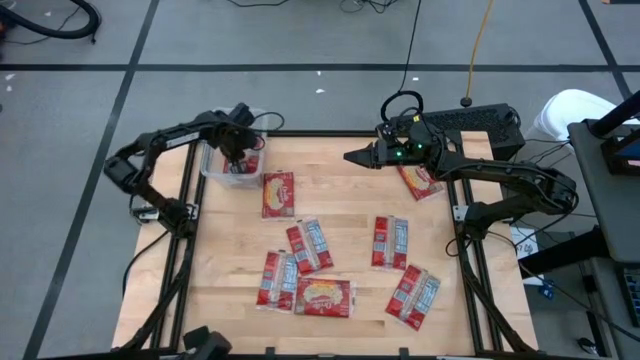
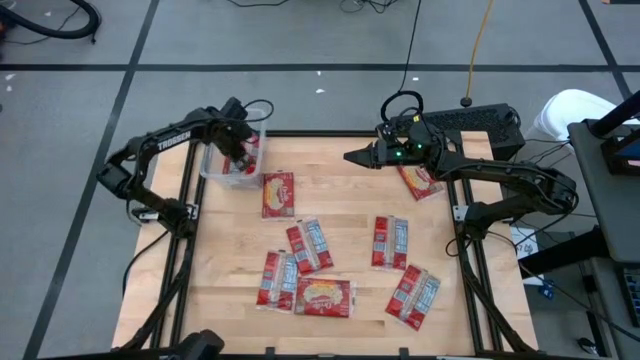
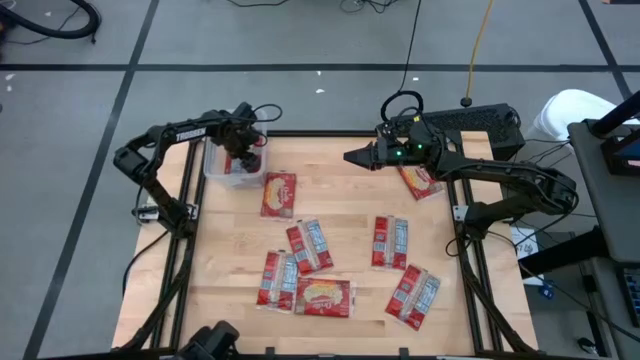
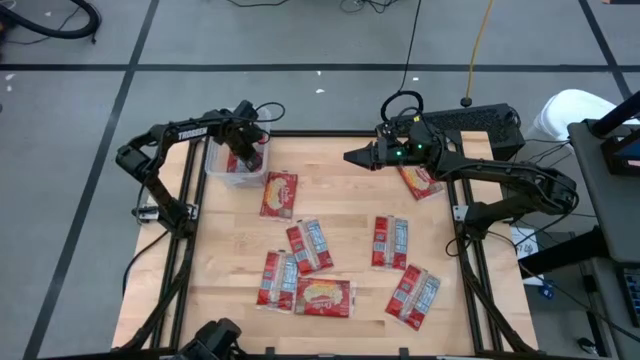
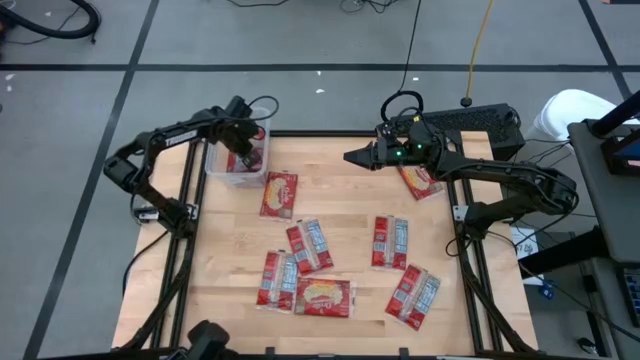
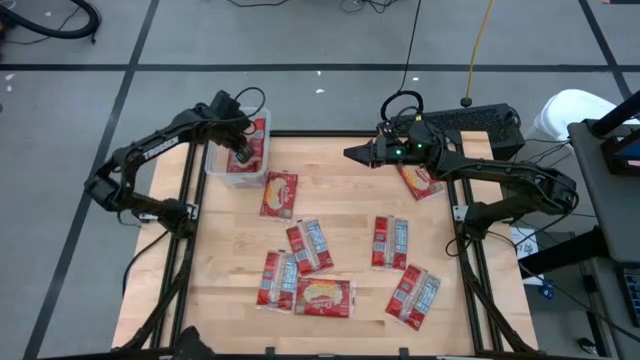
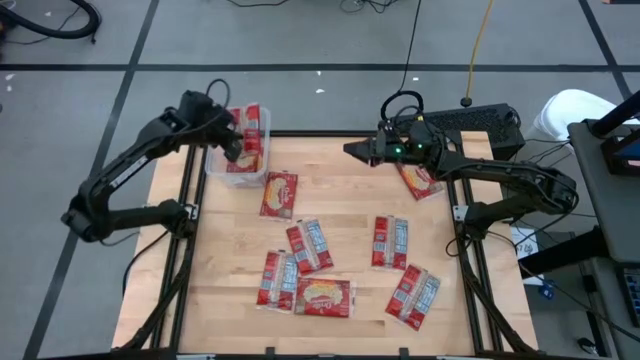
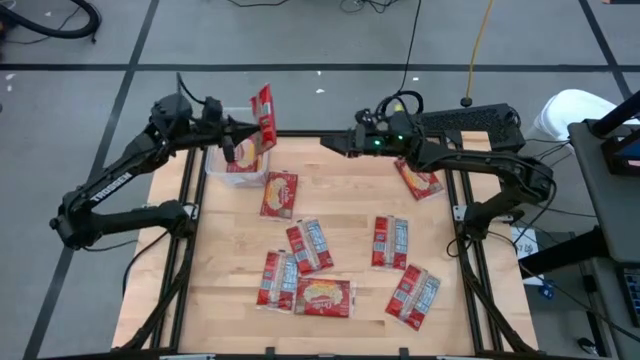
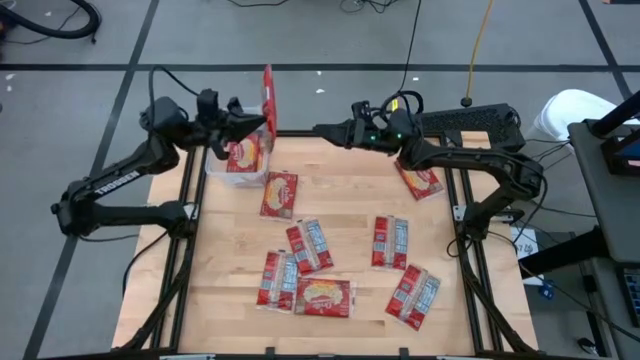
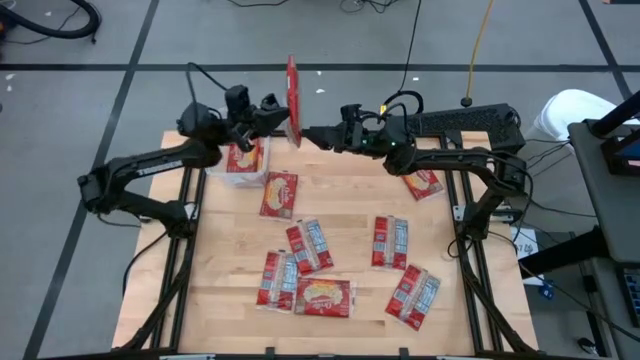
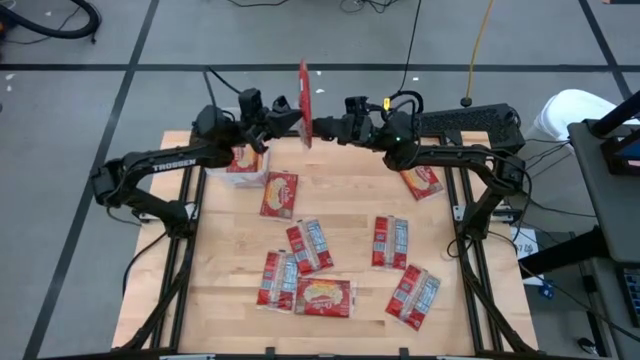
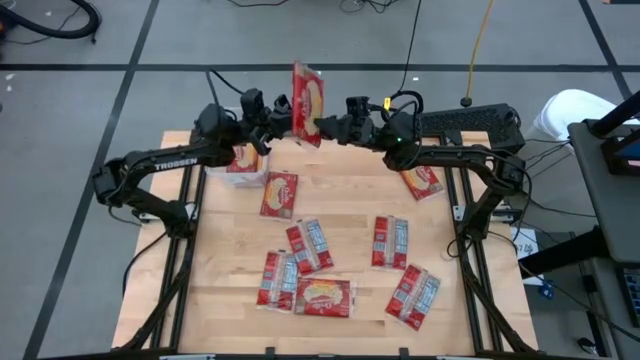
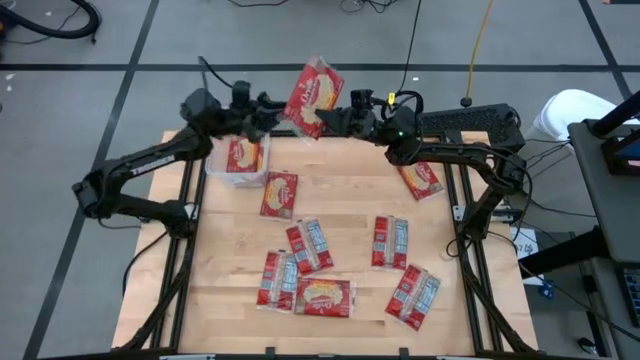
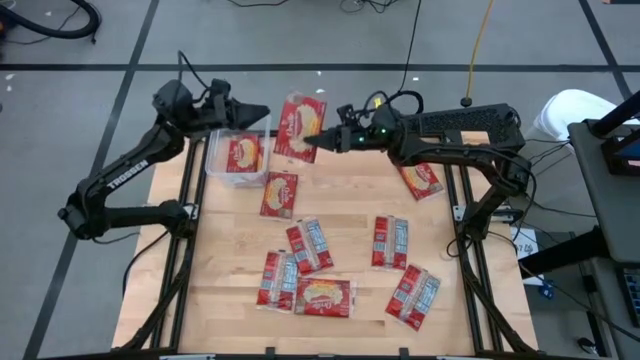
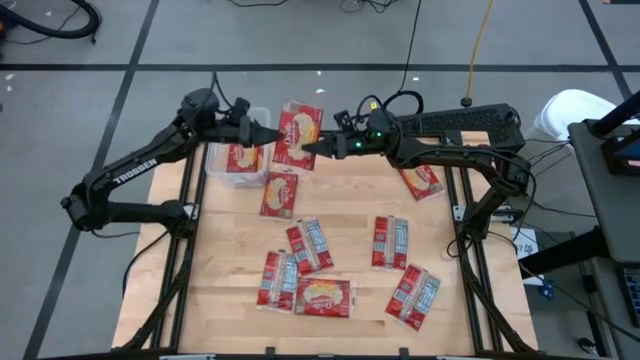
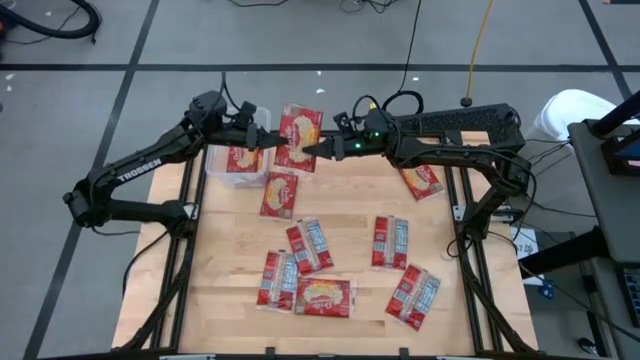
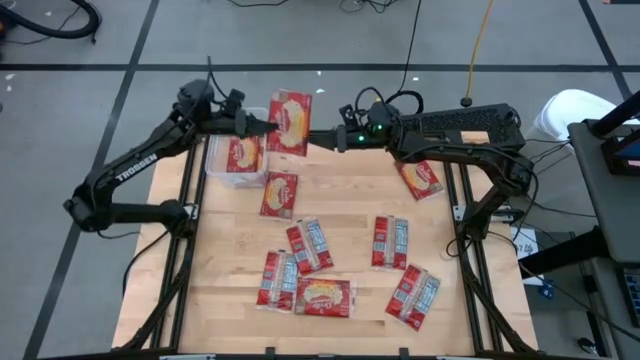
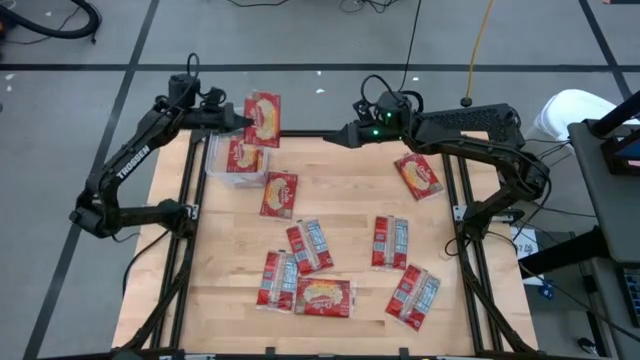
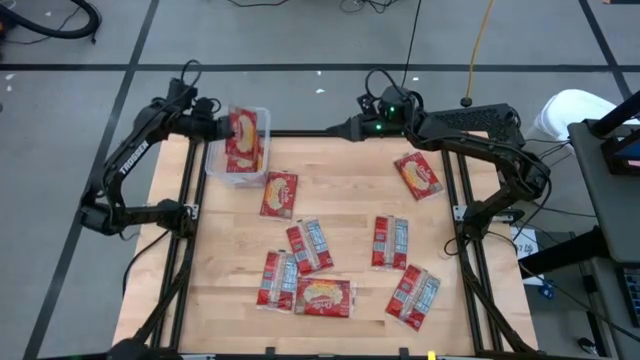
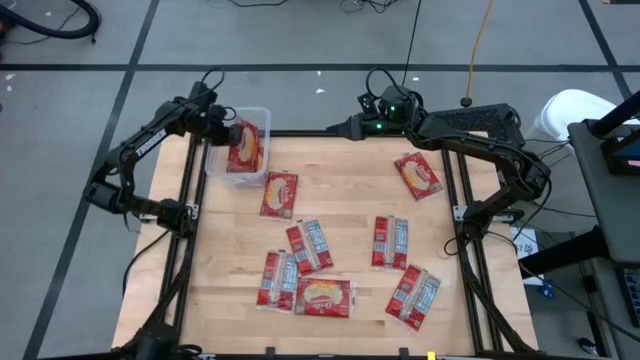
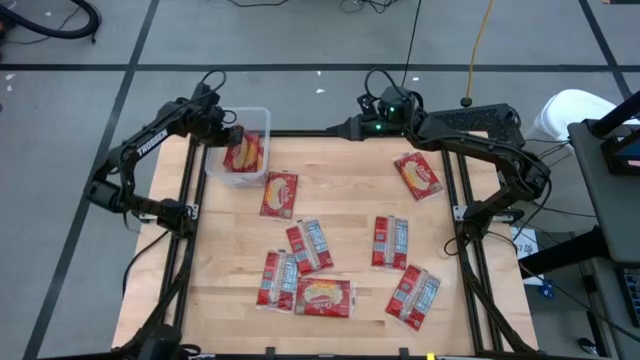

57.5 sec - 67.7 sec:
Task: Sort popcorn bags into baskets
Put the red popcorn bag into the transparent container

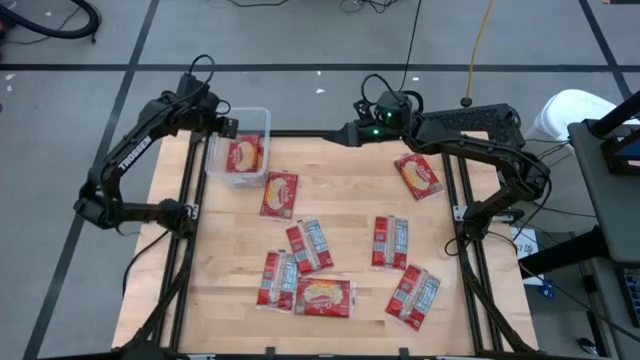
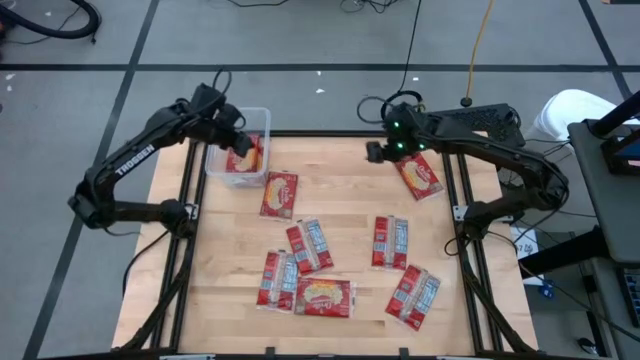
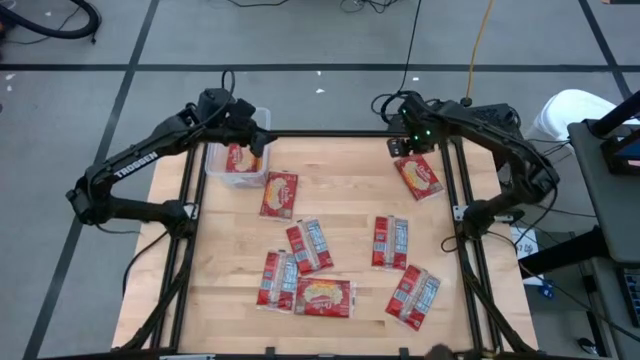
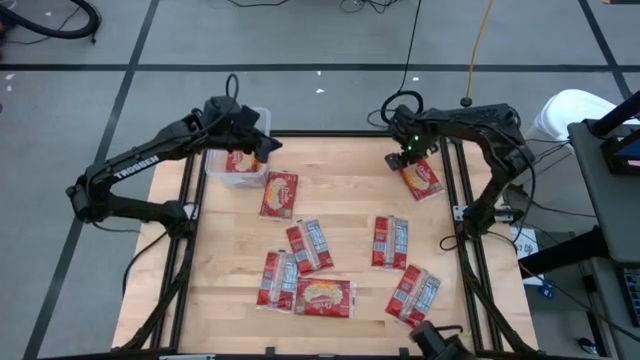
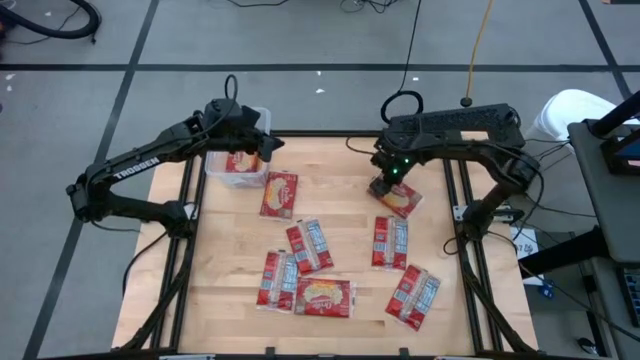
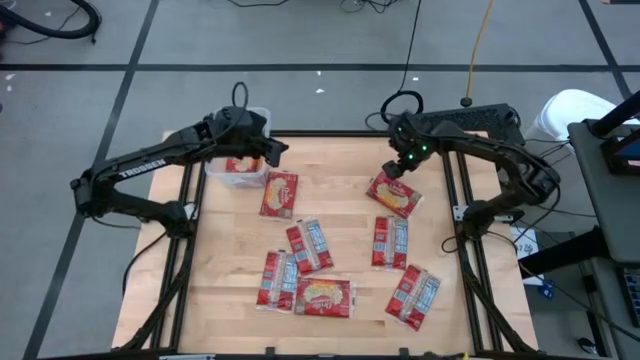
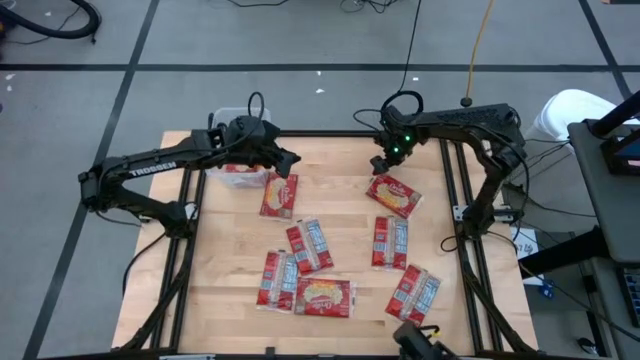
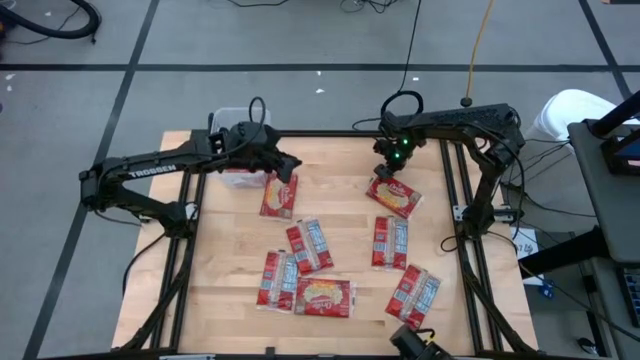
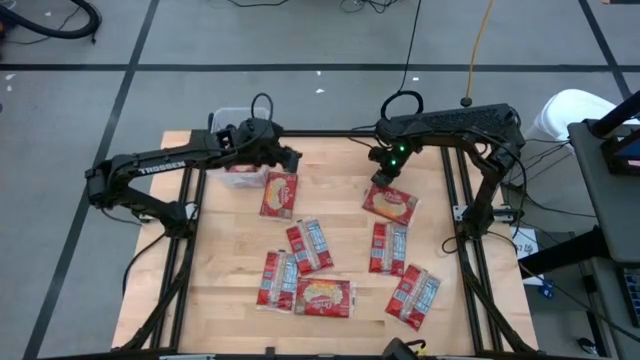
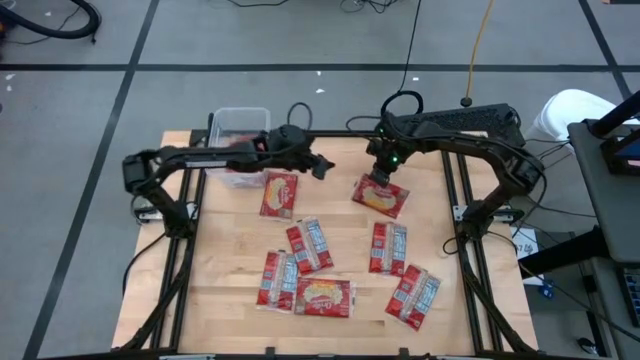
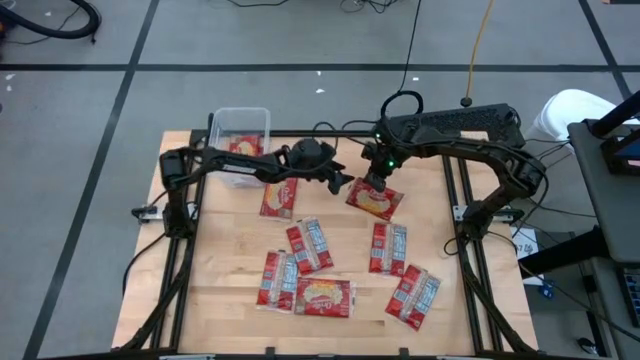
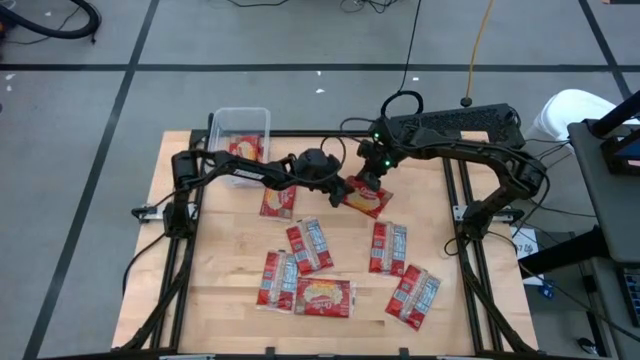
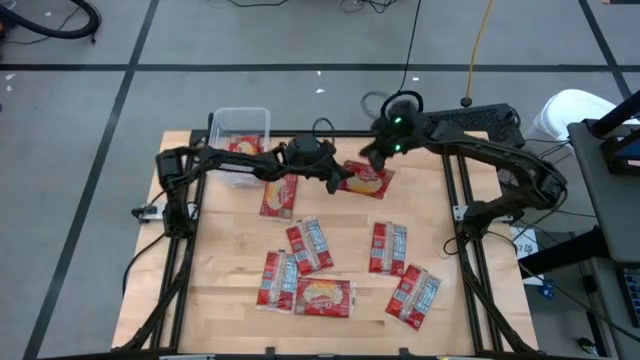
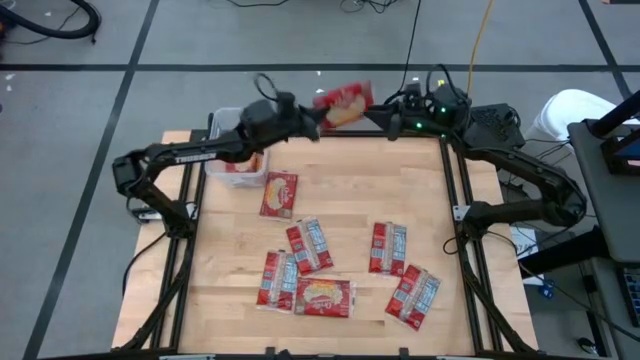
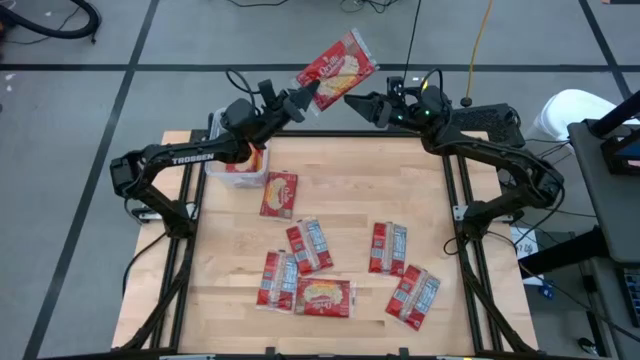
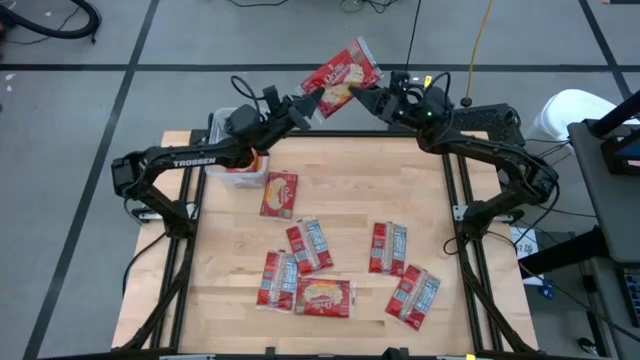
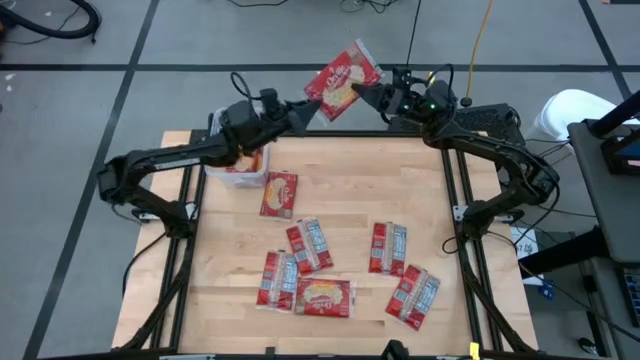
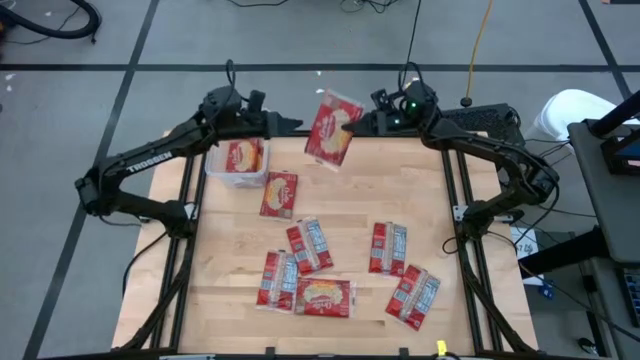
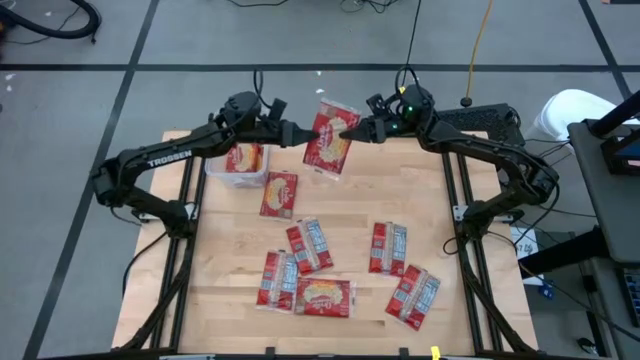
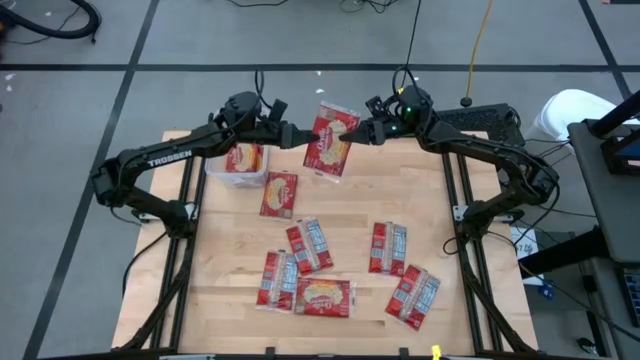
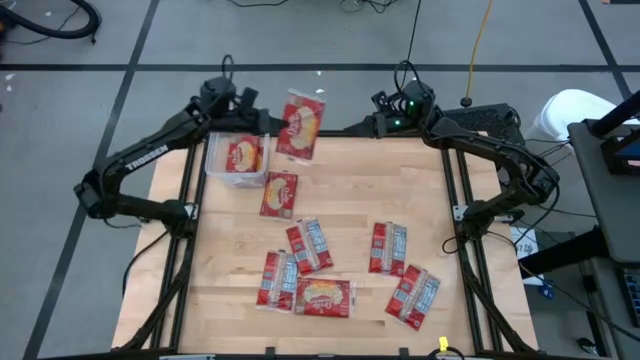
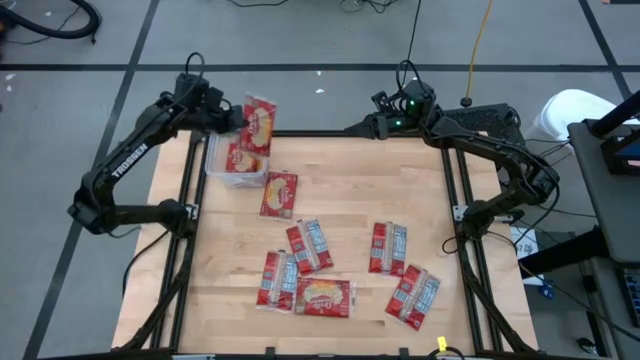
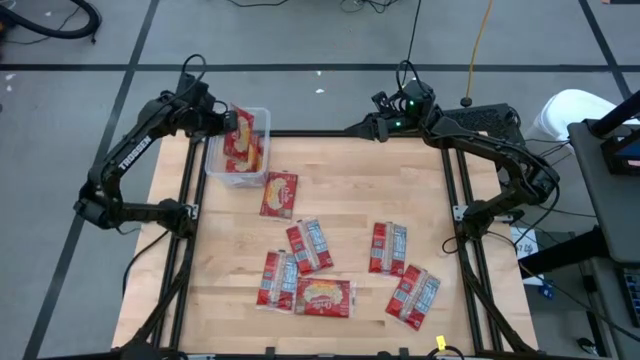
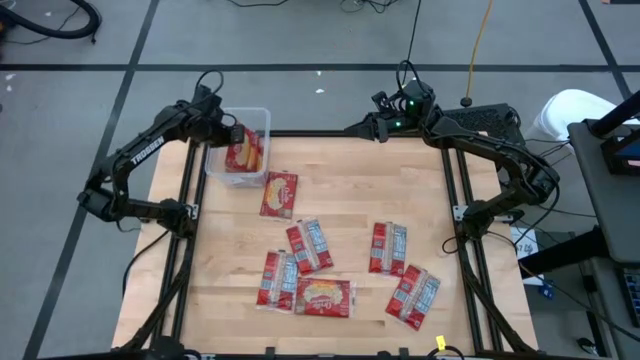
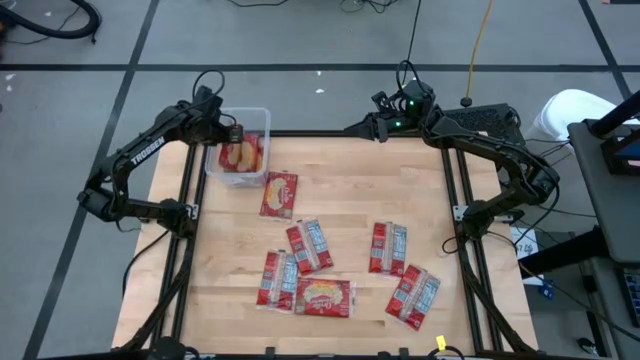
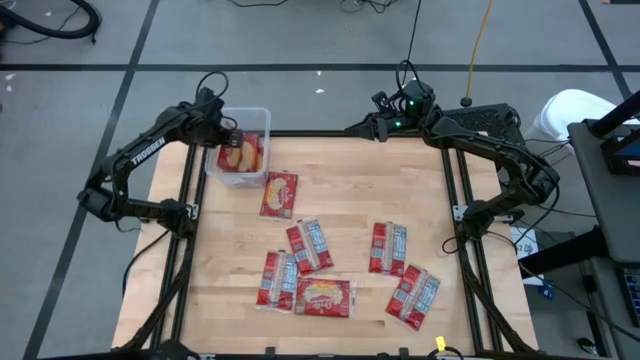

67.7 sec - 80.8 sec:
Put the red popcorn bag into the transparent container
